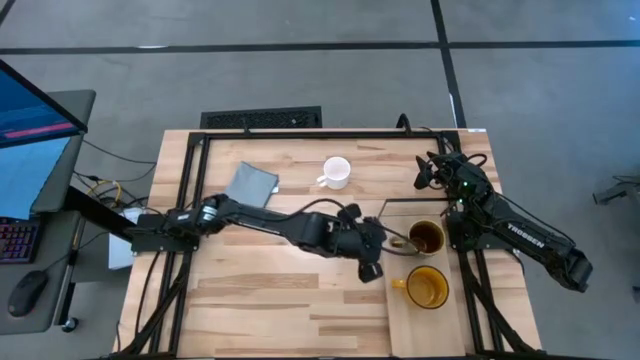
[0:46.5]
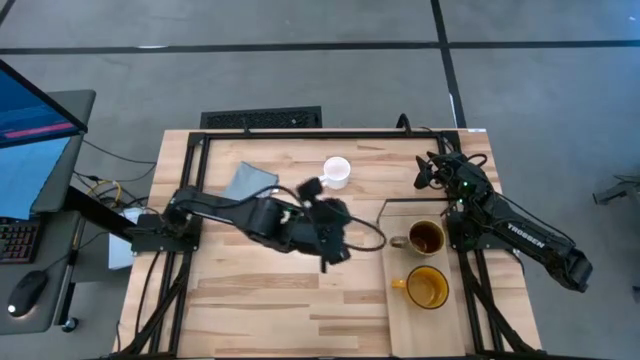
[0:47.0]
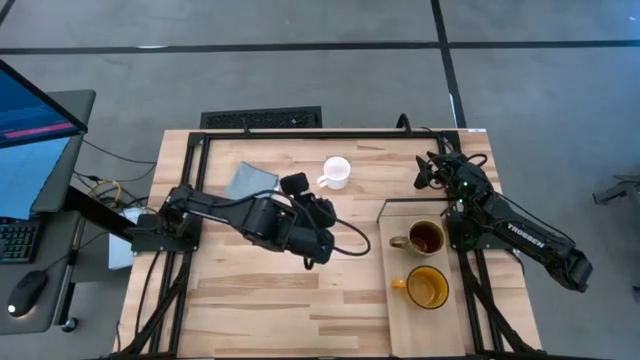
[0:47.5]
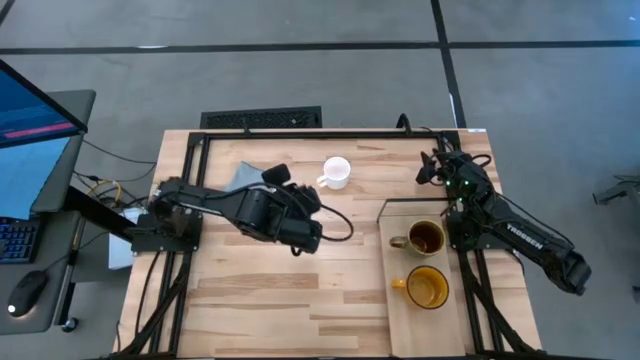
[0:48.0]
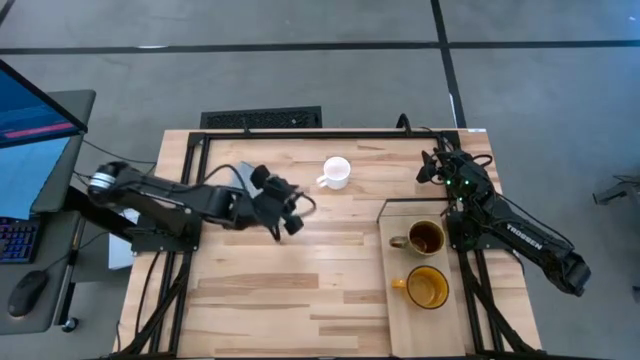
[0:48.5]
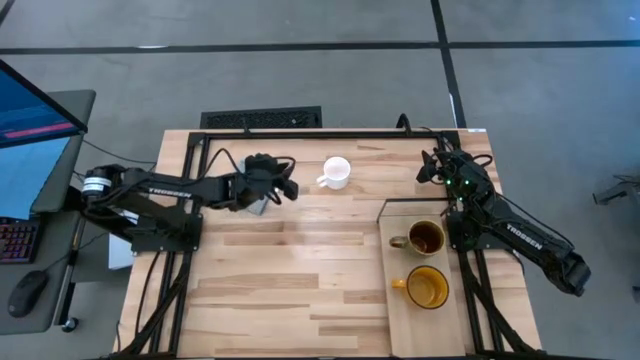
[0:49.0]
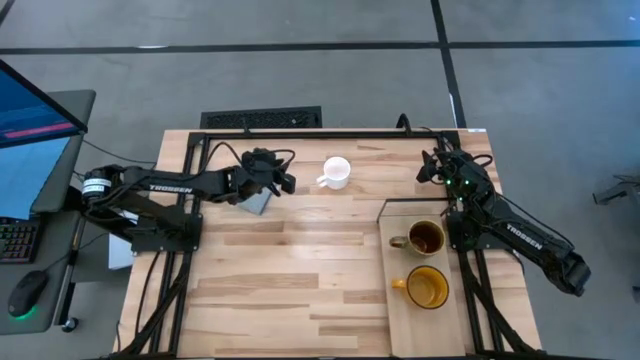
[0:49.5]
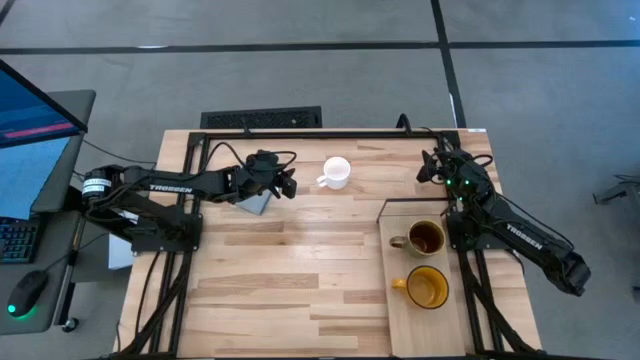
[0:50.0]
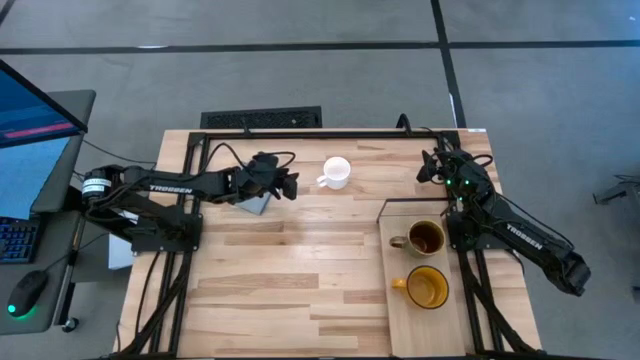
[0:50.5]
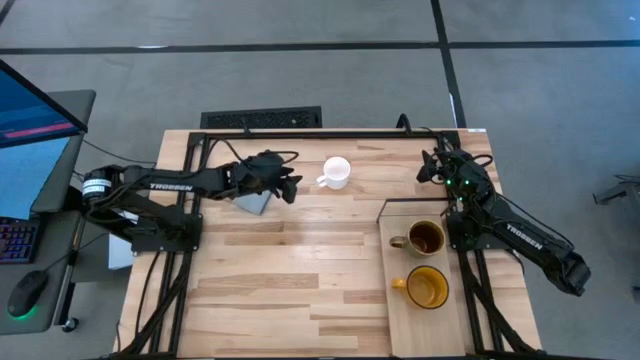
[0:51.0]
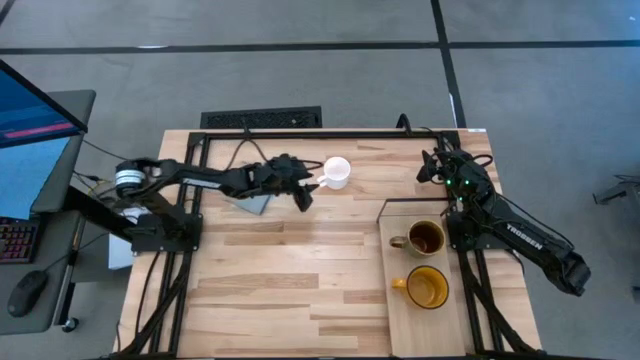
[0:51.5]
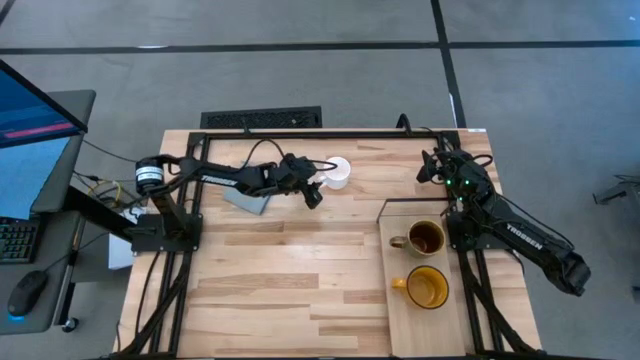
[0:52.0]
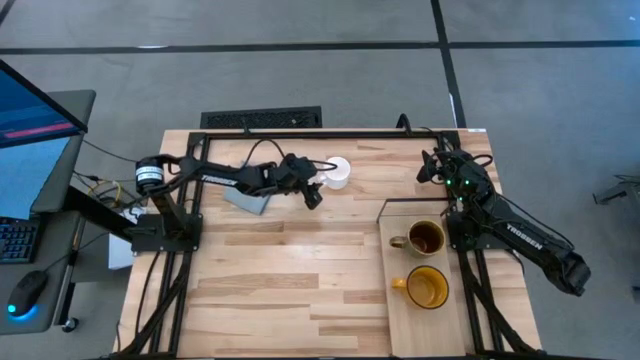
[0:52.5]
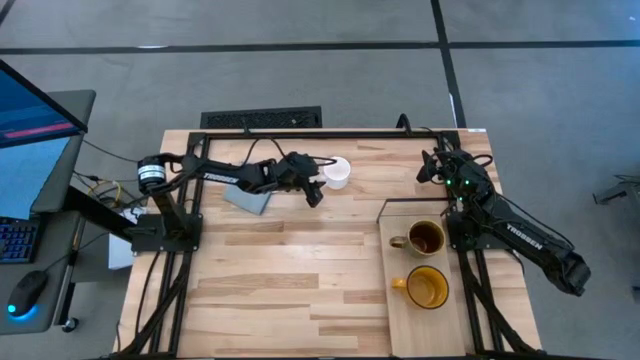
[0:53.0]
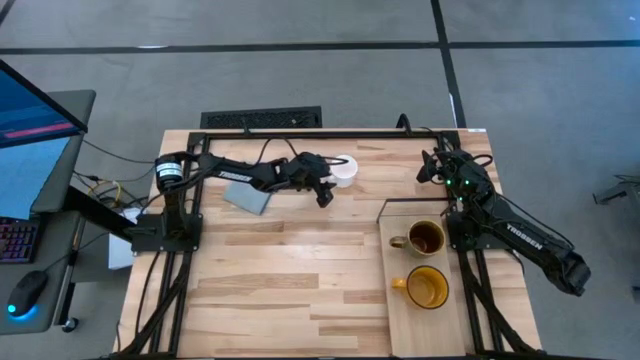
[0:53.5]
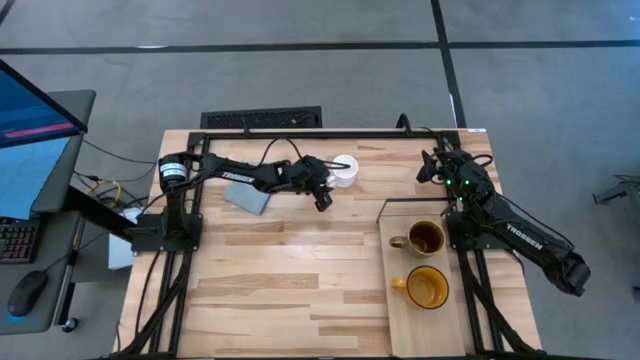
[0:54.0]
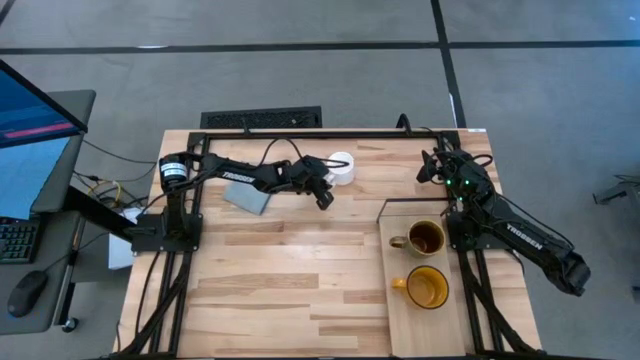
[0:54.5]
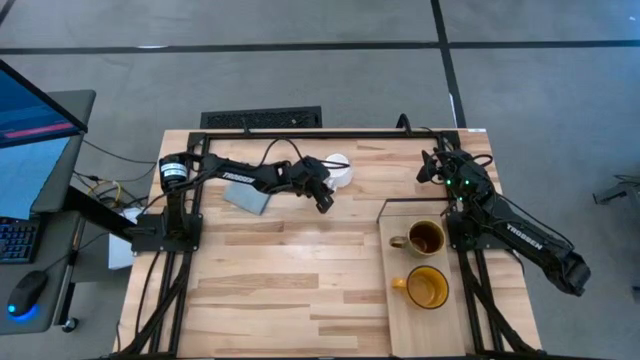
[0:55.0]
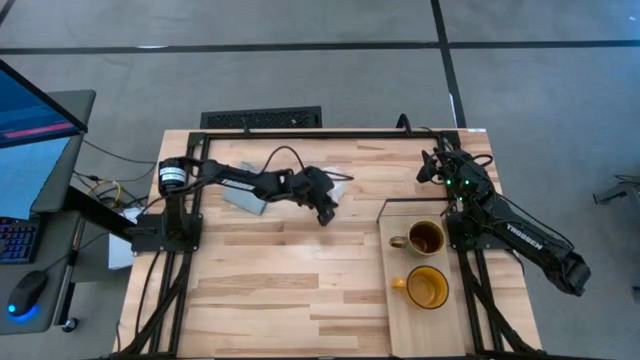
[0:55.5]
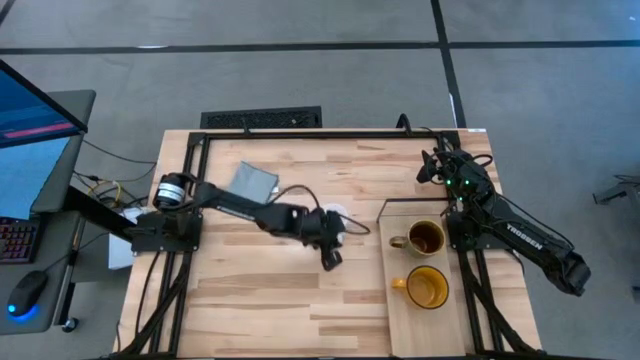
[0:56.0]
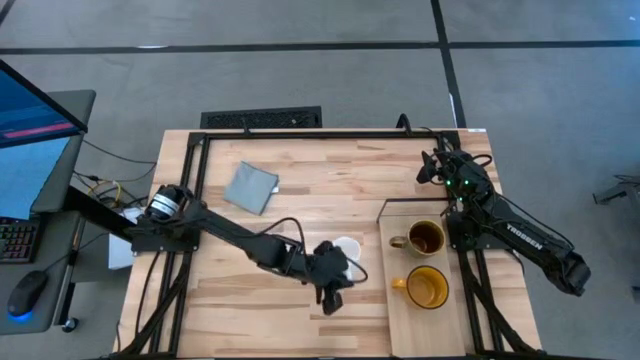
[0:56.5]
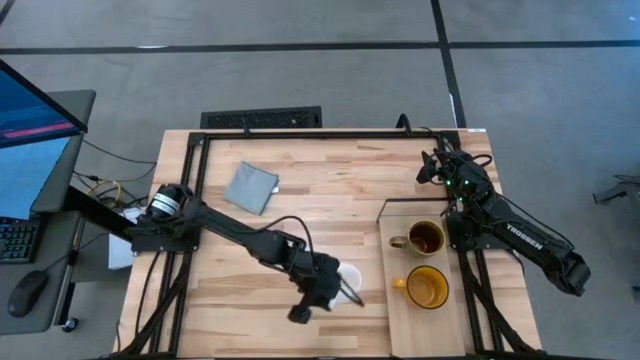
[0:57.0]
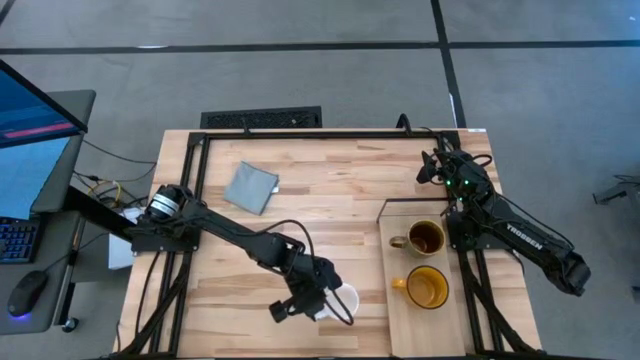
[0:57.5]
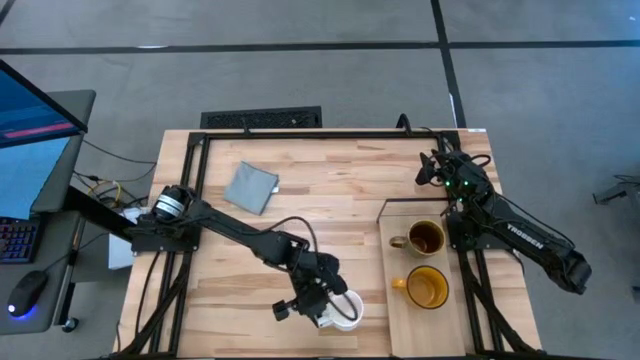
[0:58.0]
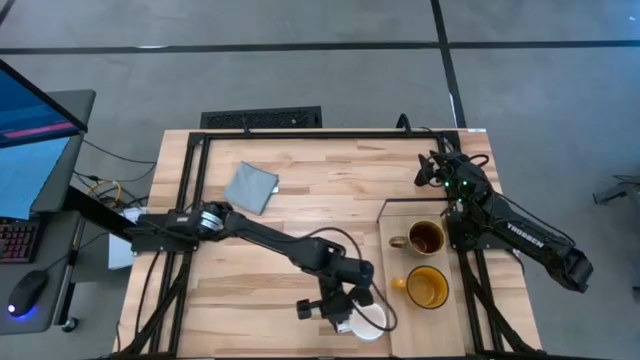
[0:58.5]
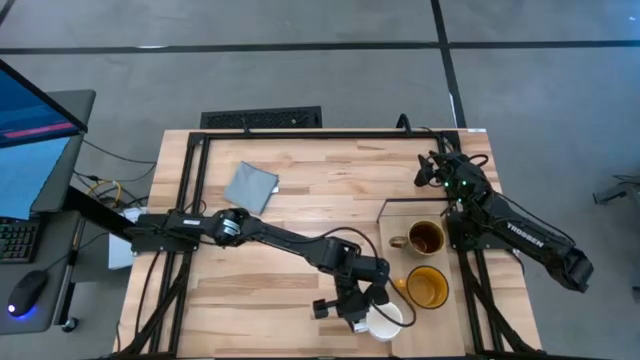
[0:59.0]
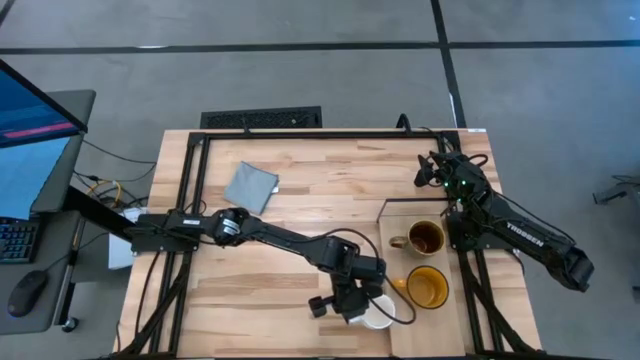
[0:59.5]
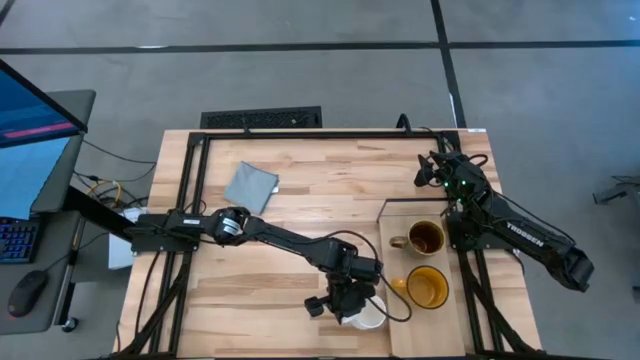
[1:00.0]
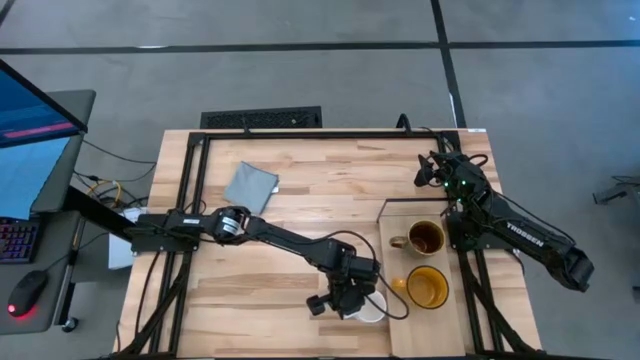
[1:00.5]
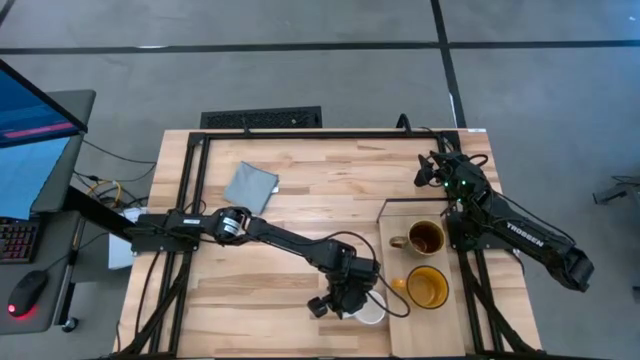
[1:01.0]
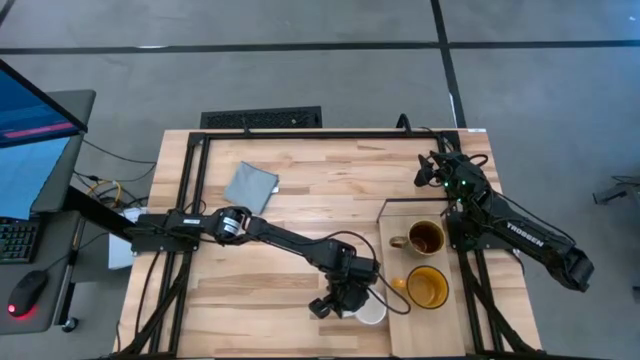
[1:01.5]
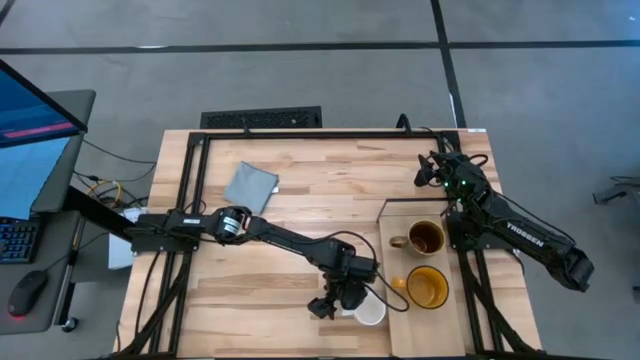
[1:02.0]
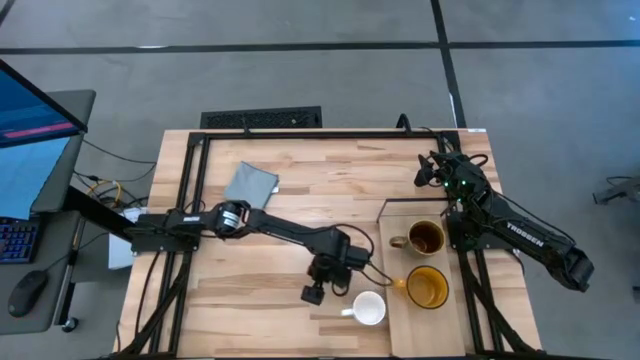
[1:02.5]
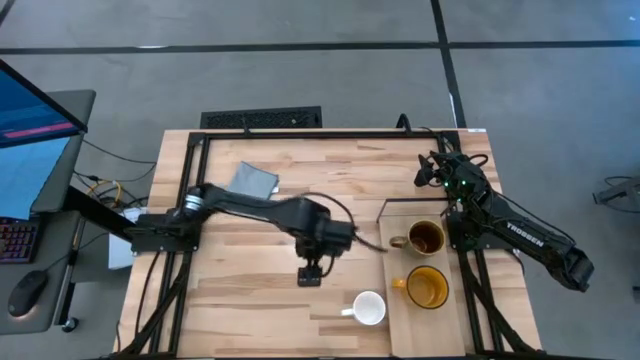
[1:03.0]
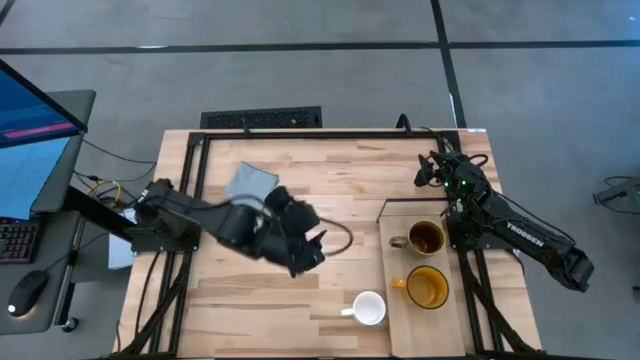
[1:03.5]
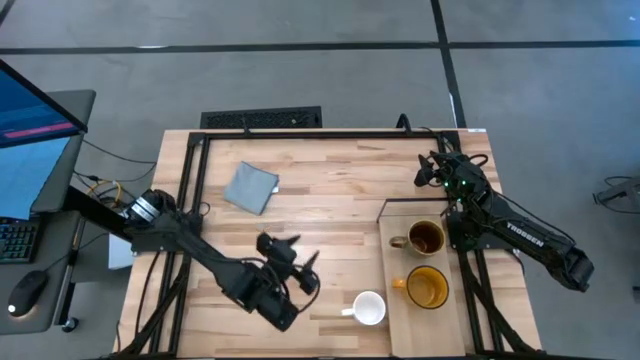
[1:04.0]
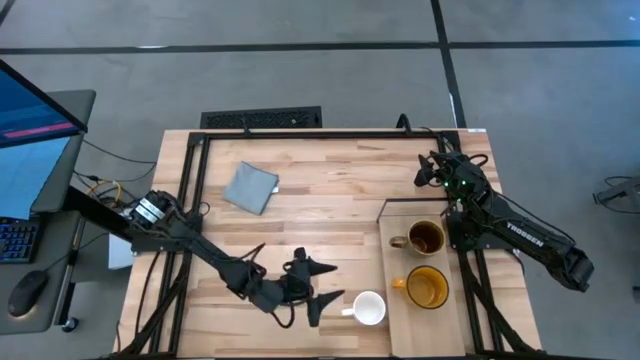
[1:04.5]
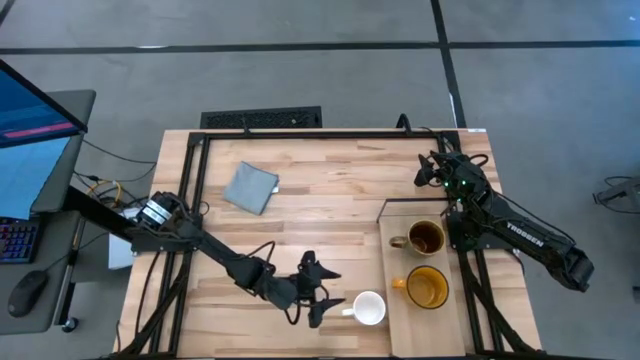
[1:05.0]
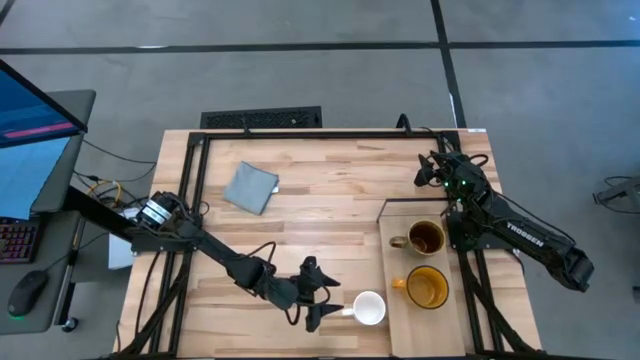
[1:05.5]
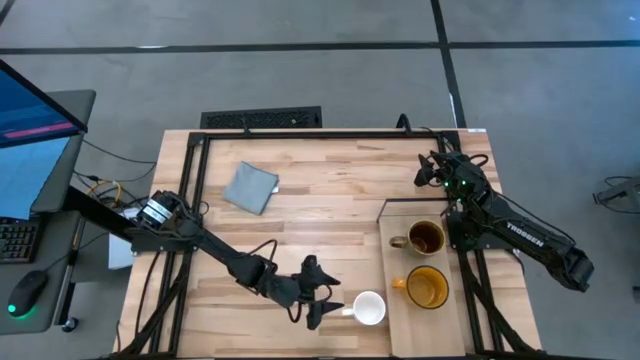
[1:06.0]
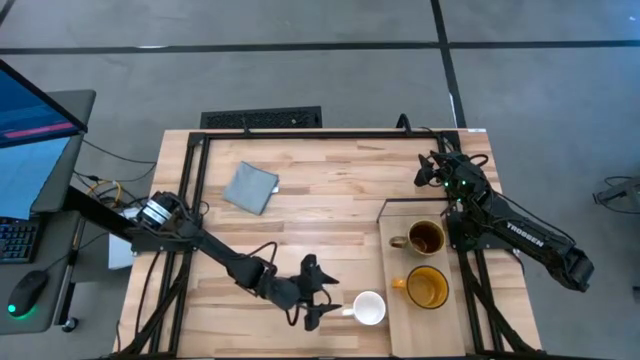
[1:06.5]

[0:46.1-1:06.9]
Task: Stack small to large cups/mugs on shelf
Put the white mug on the shelf
